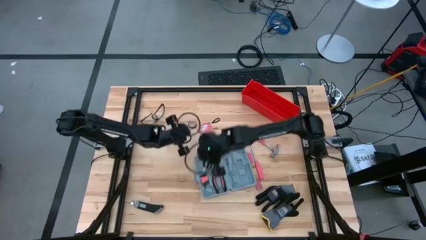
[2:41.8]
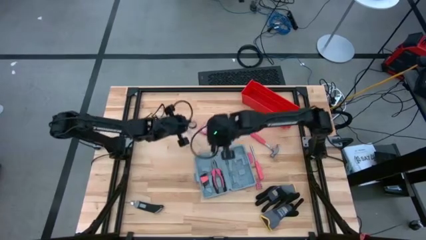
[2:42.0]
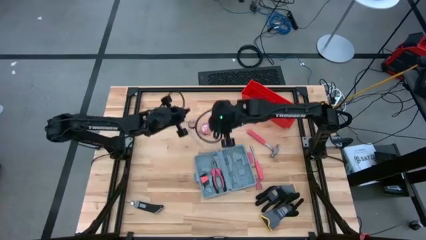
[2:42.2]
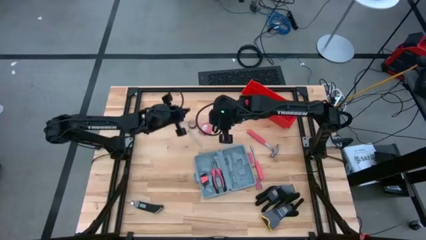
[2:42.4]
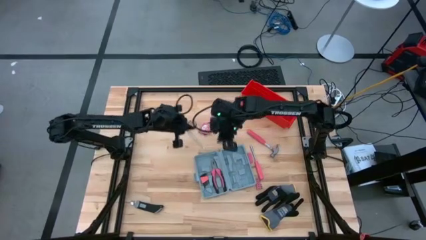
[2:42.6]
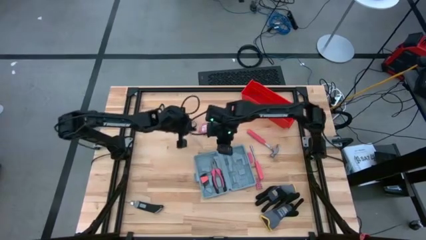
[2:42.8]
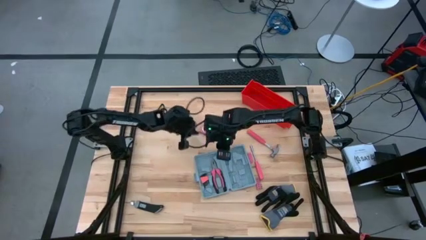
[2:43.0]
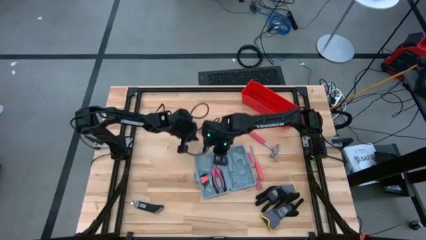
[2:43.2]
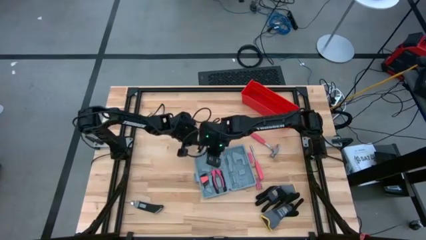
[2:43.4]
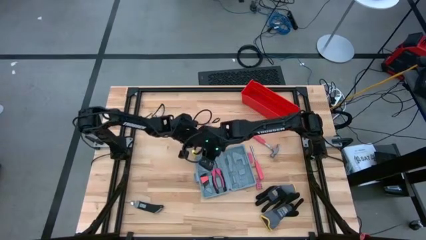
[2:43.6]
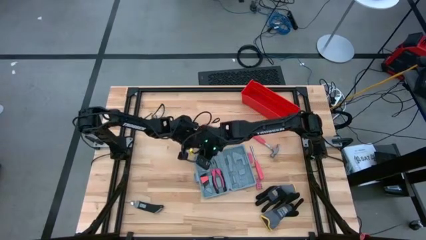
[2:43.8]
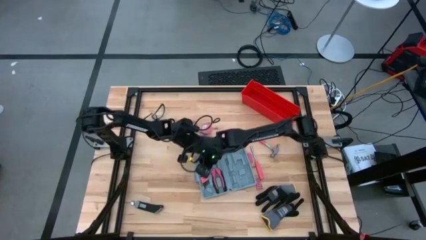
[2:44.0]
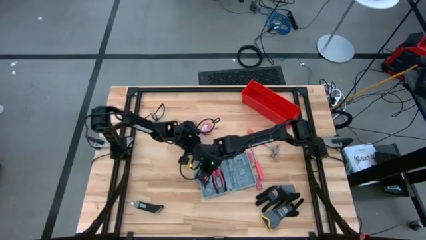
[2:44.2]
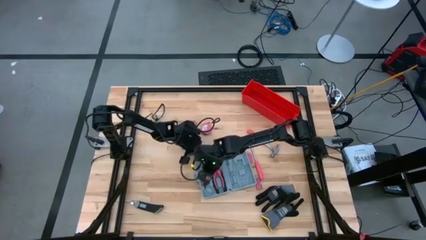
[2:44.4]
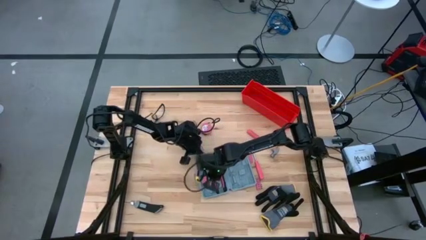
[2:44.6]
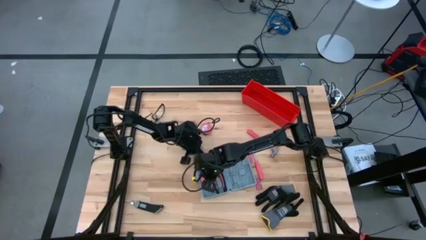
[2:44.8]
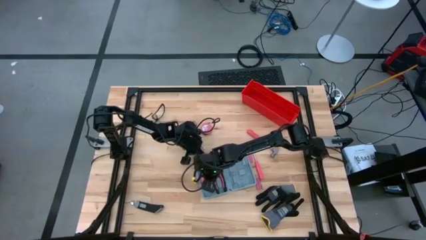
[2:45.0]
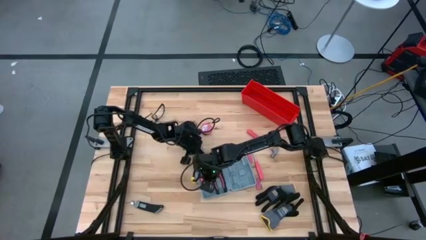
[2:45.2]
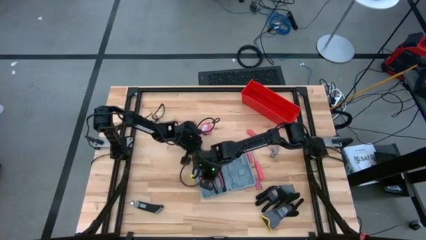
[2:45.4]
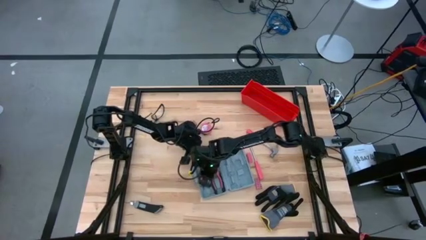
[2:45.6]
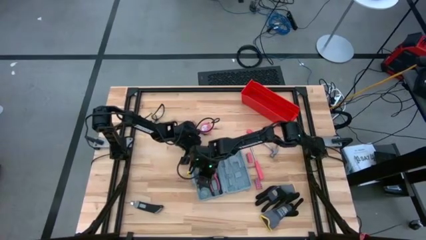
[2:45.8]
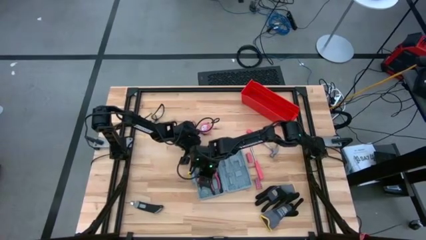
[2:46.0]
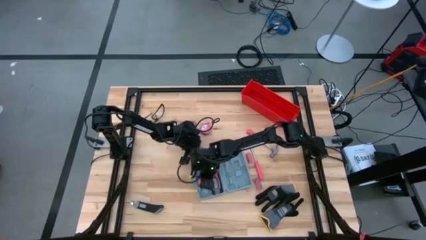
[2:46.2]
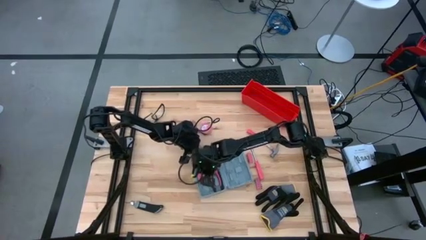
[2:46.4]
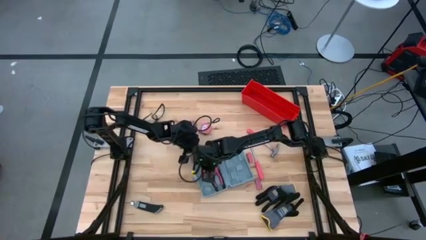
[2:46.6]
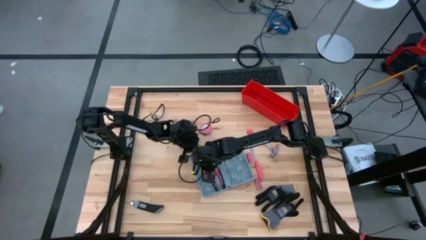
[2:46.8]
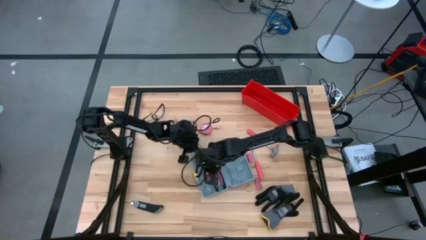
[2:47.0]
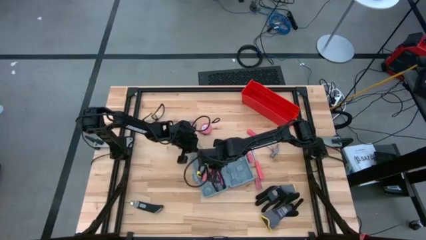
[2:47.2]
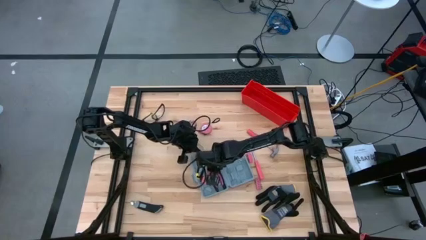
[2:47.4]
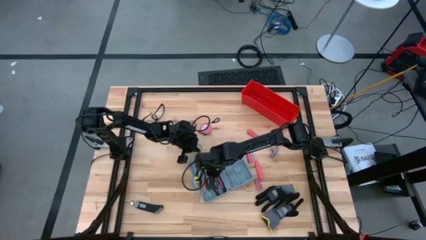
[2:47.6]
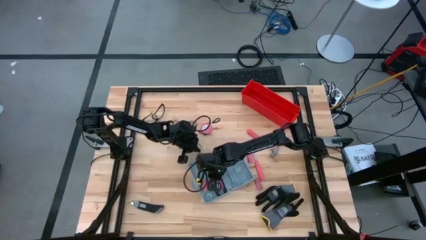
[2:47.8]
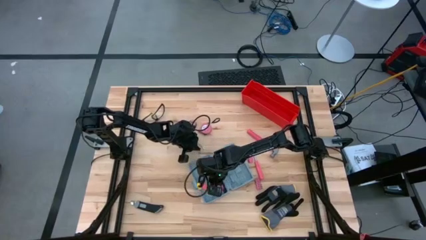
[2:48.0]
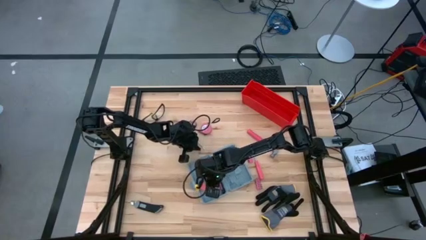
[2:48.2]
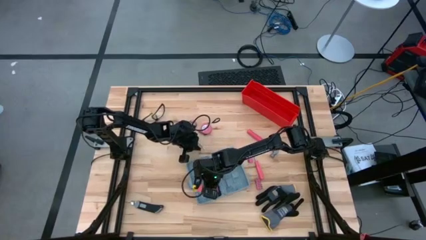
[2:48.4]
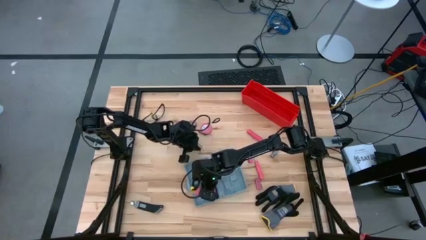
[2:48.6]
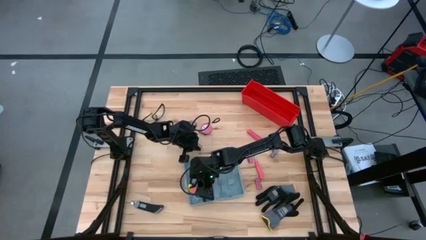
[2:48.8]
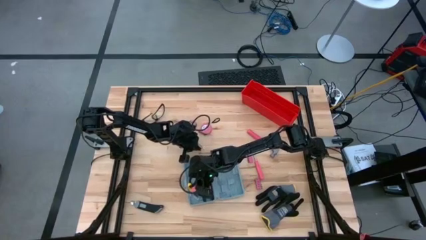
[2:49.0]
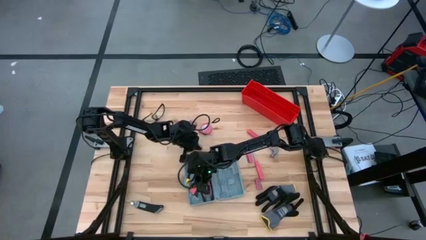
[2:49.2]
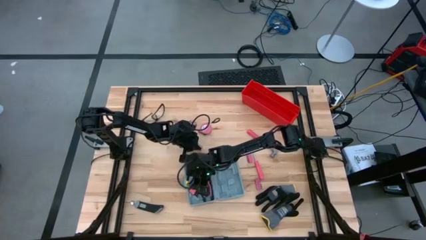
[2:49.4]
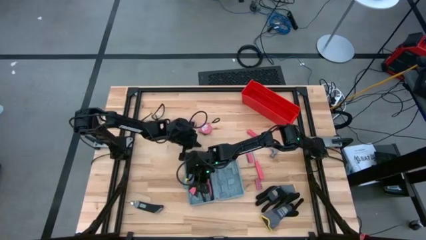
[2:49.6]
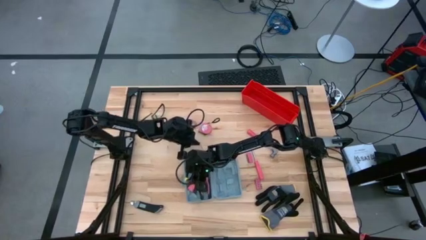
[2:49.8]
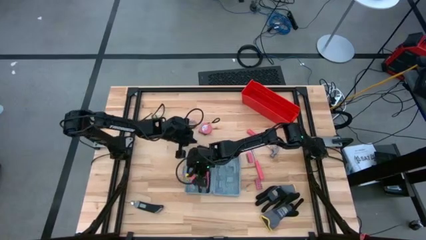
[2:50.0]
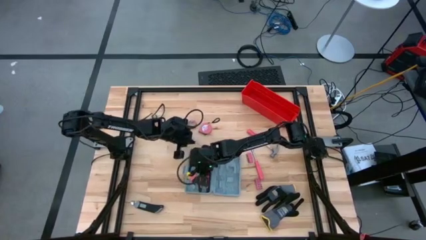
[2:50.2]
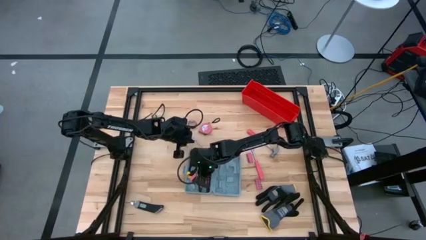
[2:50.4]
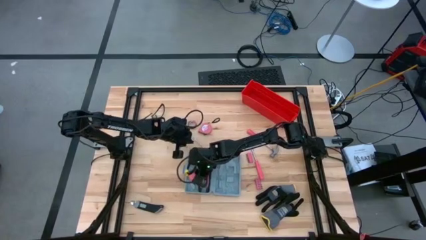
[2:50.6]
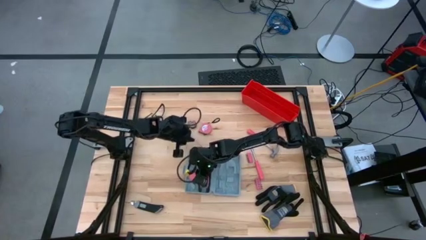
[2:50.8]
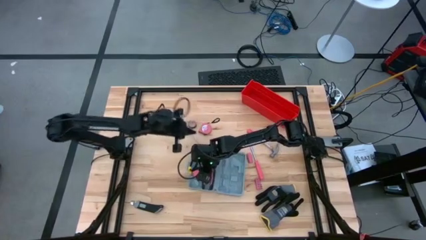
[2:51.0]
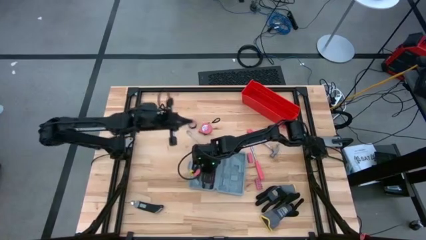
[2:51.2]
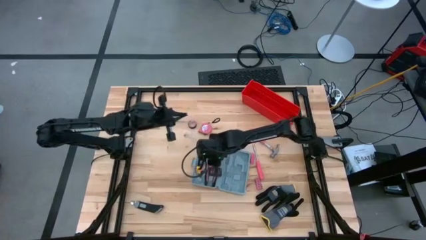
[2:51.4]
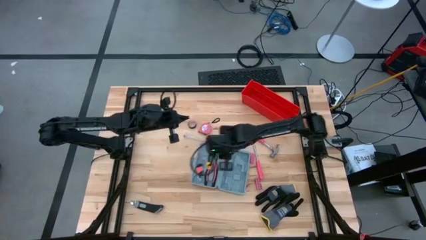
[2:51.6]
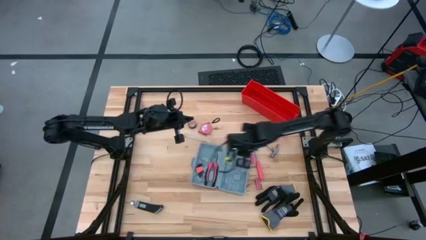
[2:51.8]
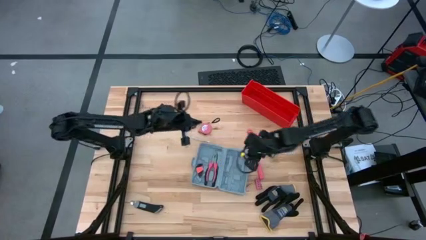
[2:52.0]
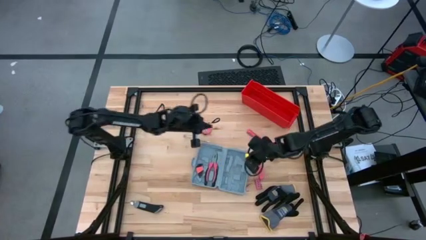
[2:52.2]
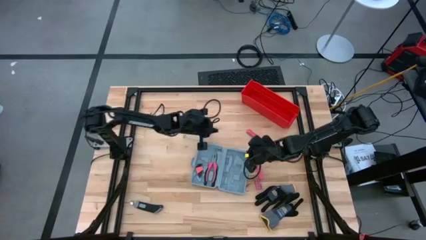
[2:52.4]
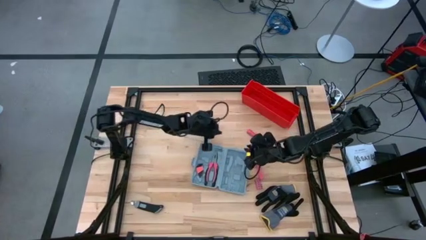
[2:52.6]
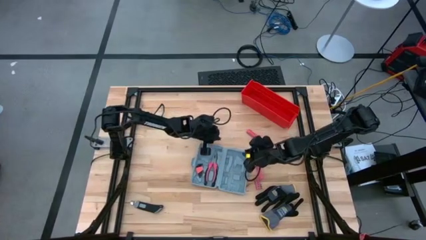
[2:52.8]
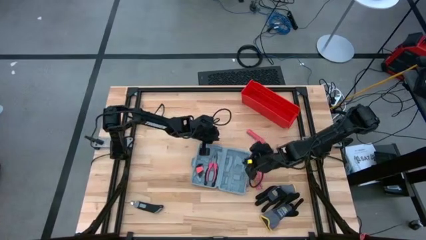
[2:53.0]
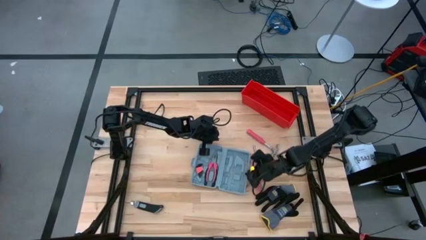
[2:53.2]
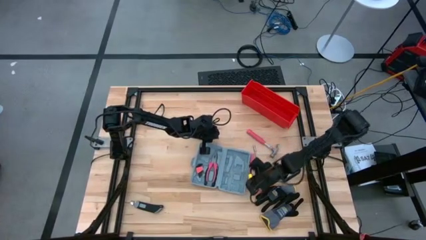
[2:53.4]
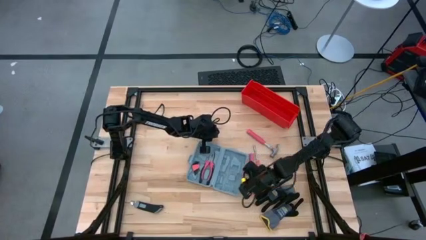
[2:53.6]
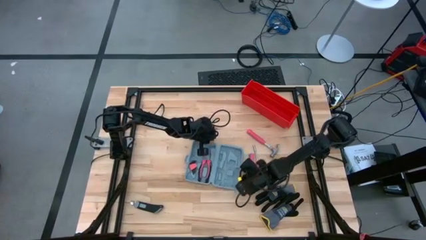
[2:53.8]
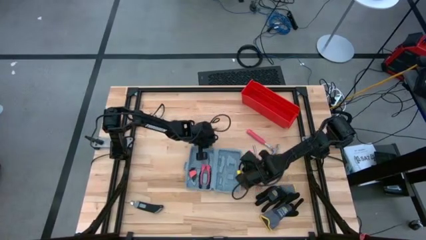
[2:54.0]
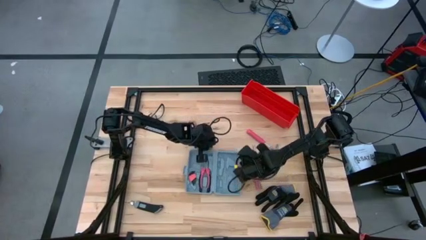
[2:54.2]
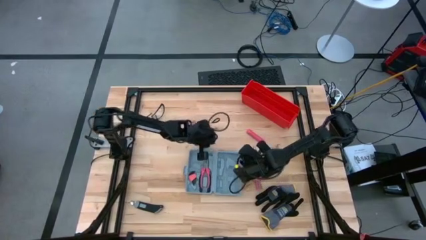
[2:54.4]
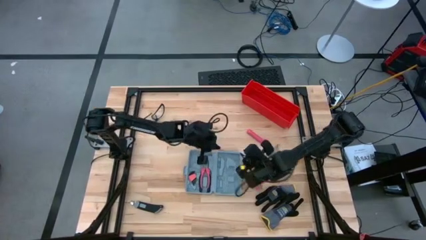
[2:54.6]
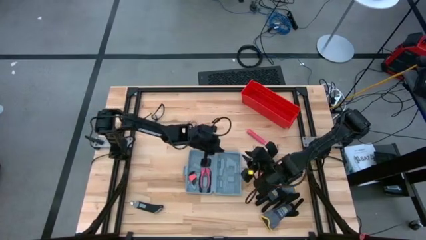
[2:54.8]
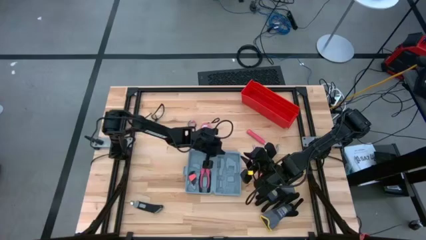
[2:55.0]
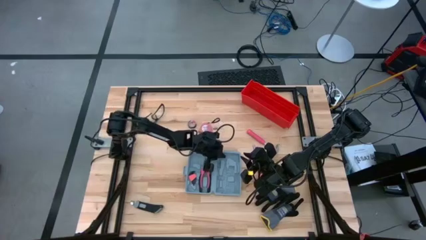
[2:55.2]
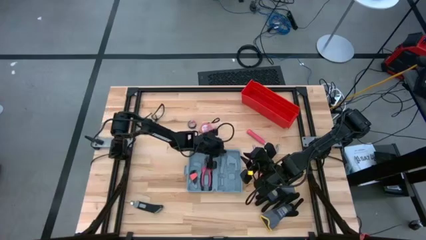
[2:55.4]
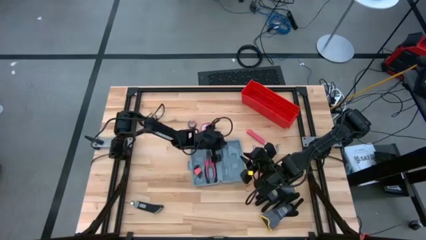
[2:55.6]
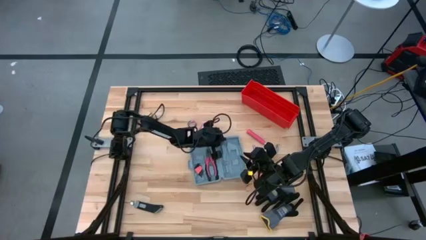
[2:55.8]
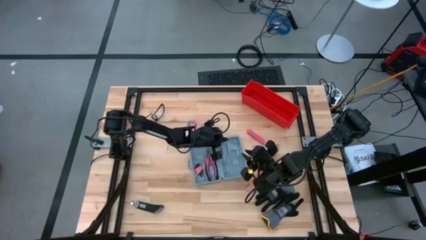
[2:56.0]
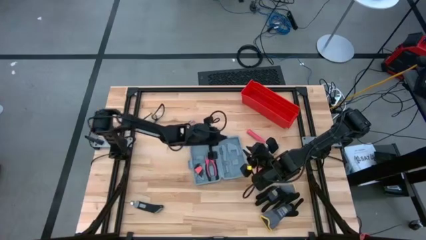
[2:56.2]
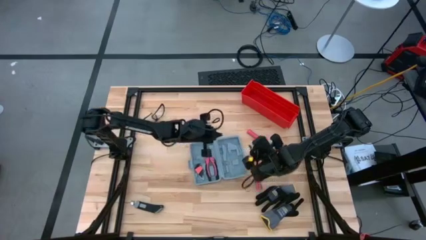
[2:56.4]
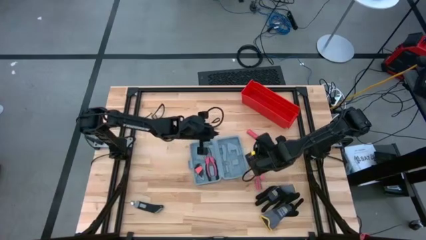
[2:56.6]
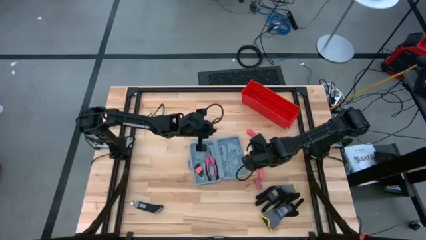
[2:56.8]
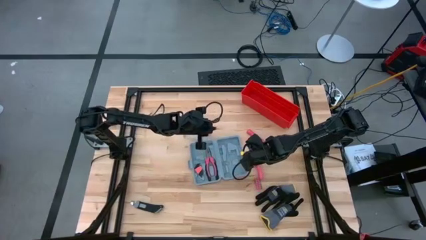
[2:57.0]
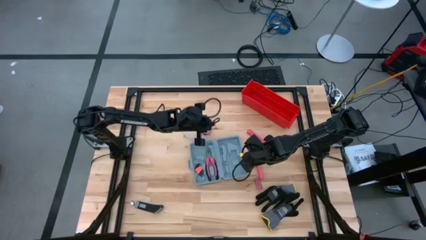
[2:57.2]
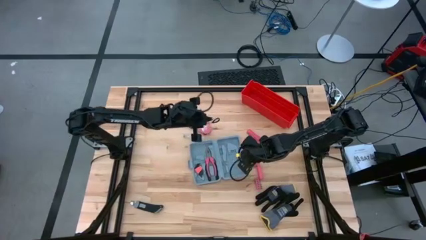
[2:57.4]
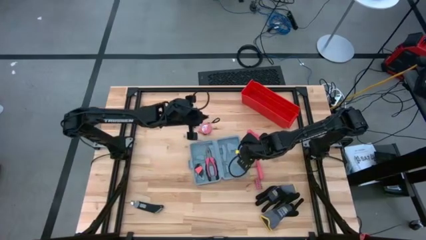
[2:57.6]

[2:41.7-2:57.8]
Task: prefit tool cases
Adjust the hex key on the toolbox
